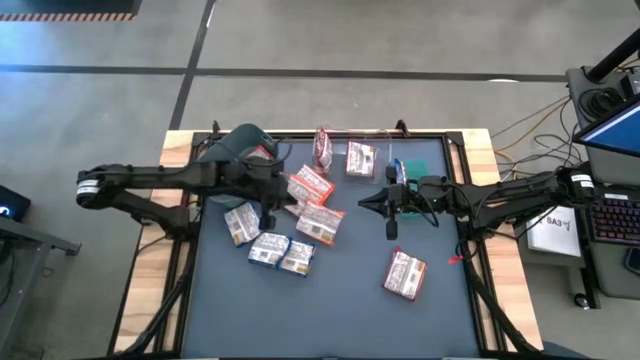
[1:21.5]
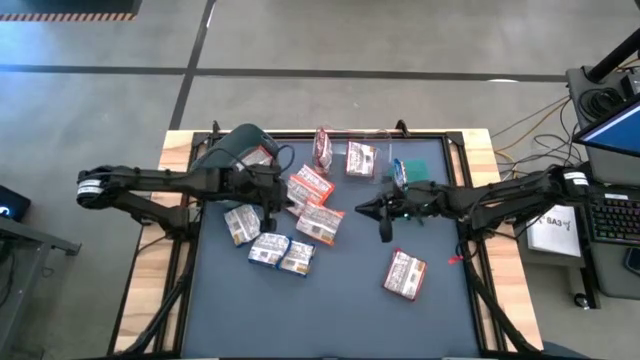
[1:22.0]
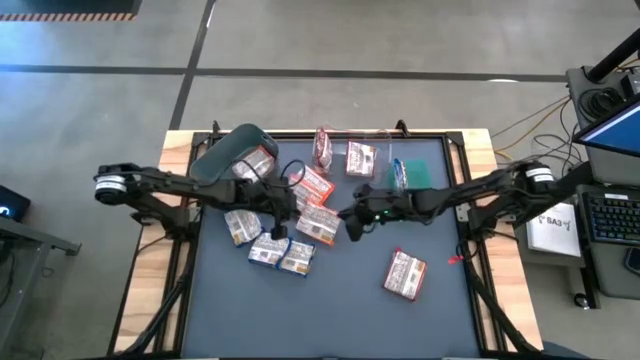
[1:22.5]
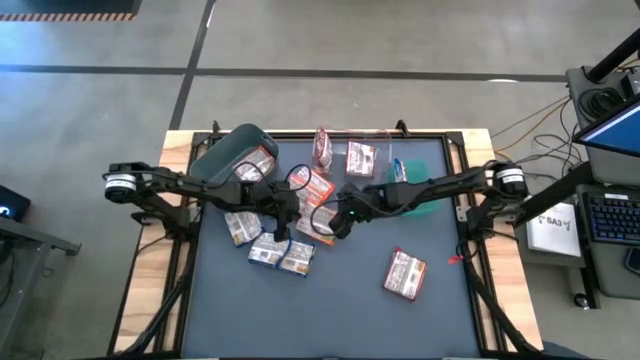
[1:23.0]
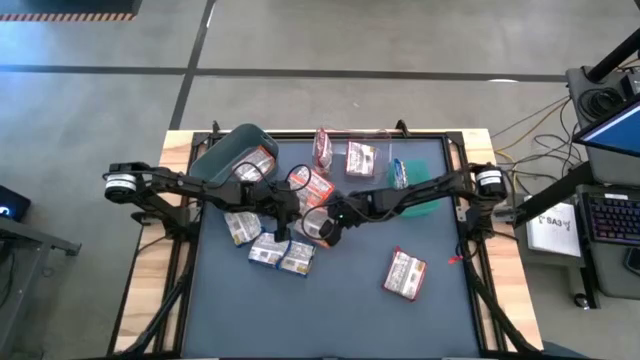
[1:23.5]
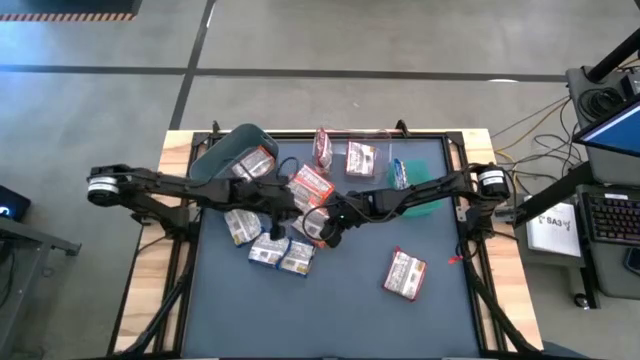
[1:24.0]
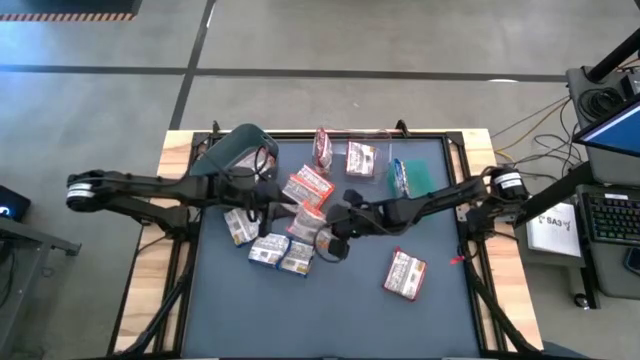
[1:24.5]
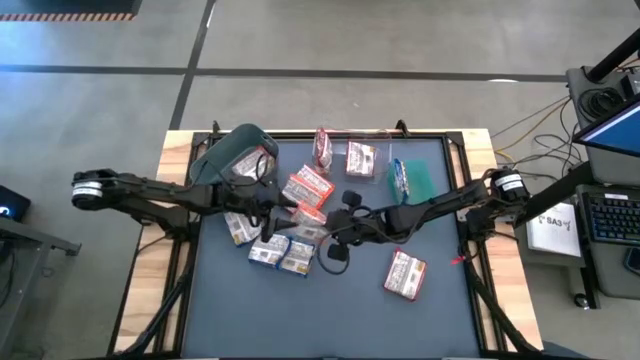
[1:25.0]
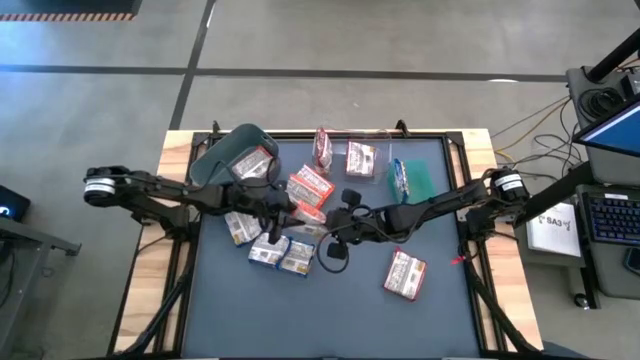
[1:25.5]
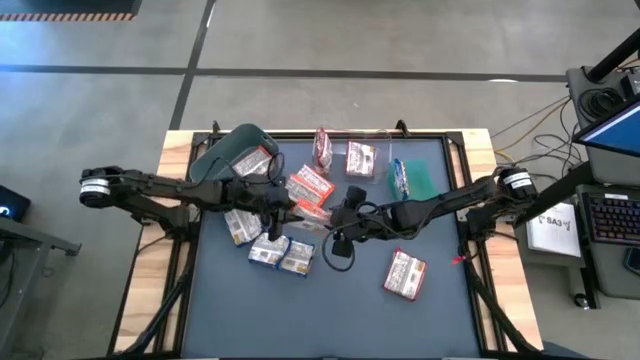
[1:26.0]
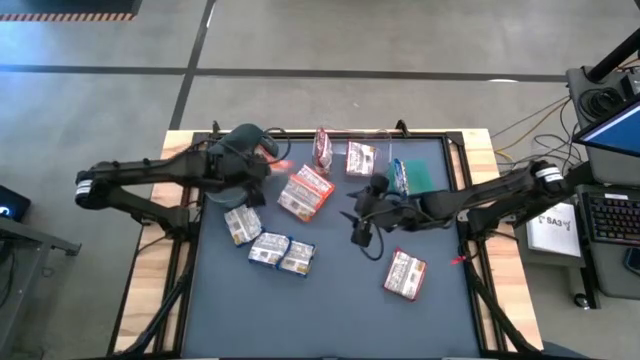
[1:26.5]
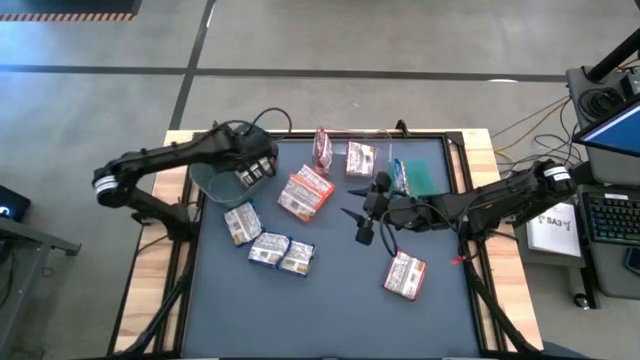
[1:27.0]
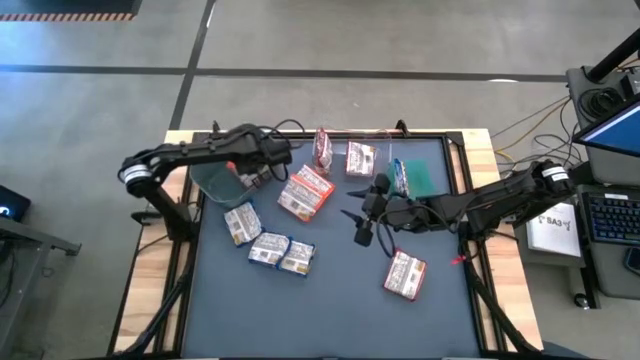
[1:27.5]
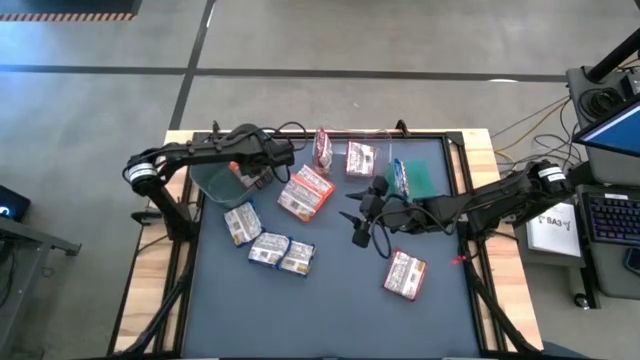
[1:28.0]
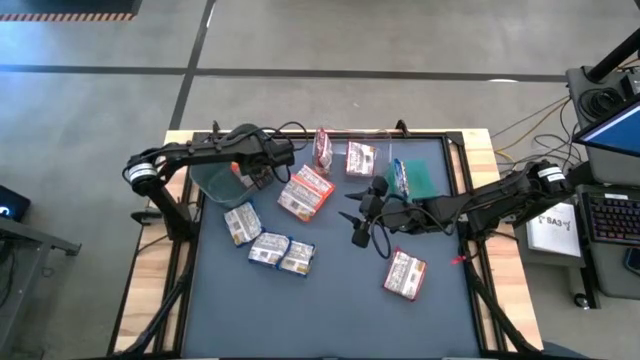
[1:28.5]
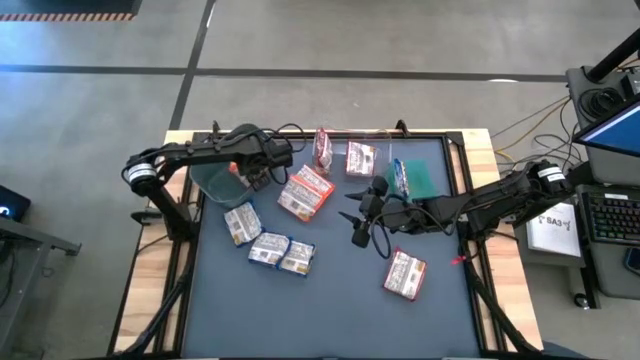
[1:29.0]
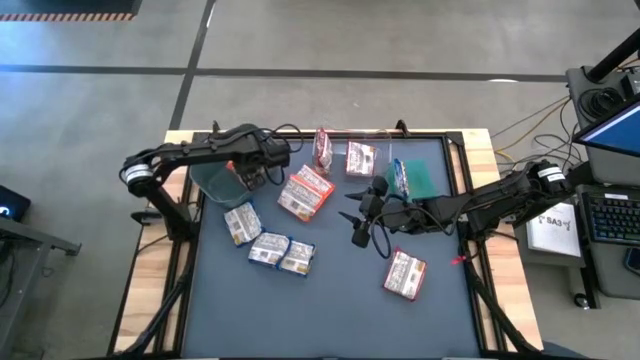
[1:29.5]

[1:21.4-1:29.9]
Task: Sort Maruchan noodles
Put the orange noodle pack into the gray bin

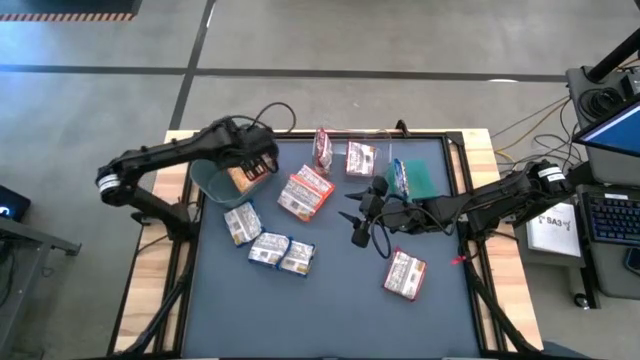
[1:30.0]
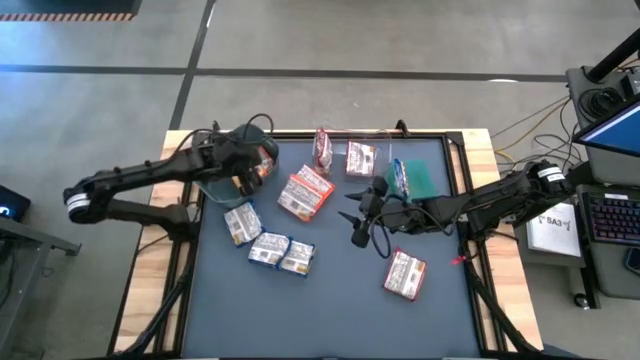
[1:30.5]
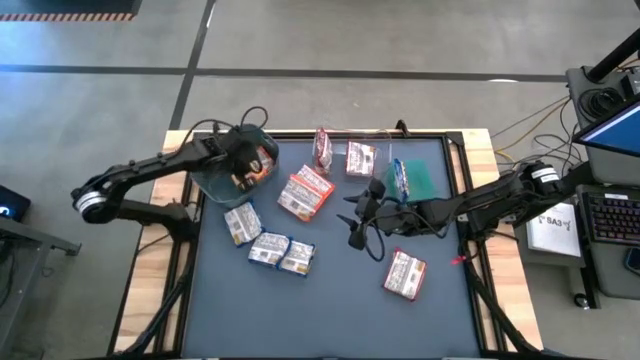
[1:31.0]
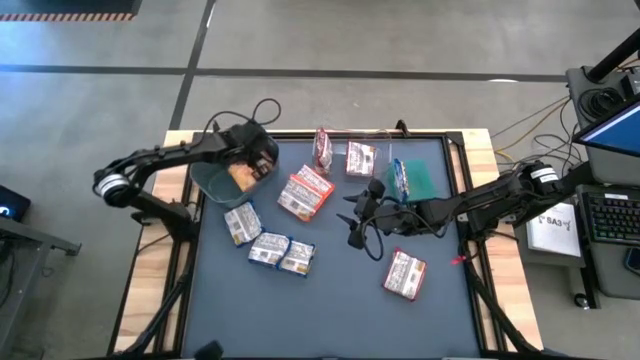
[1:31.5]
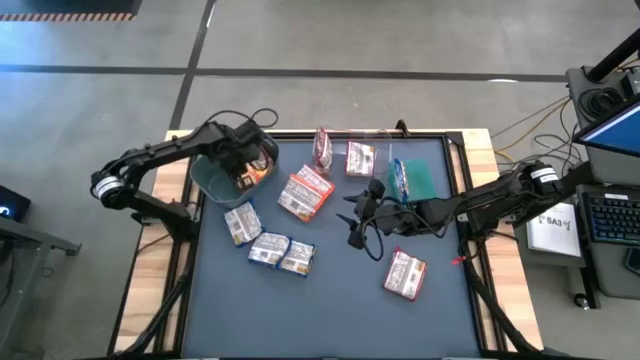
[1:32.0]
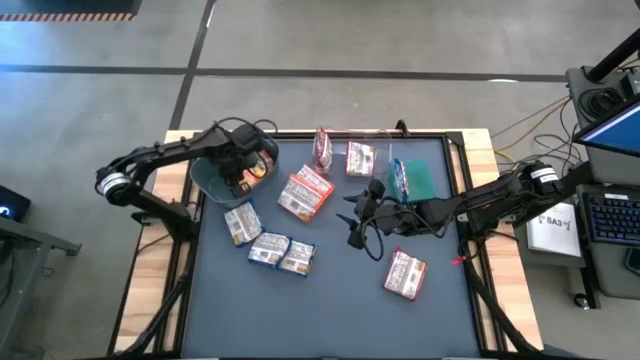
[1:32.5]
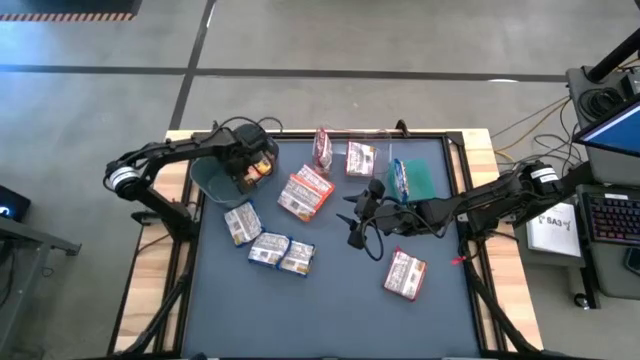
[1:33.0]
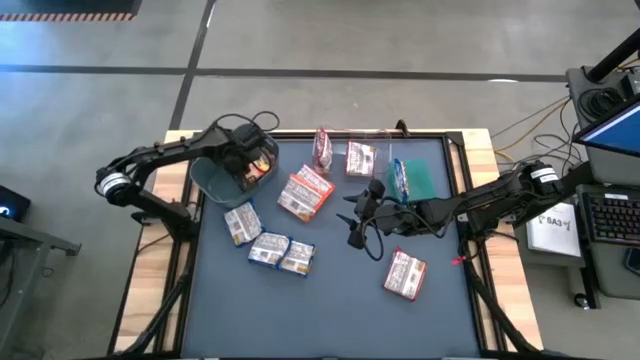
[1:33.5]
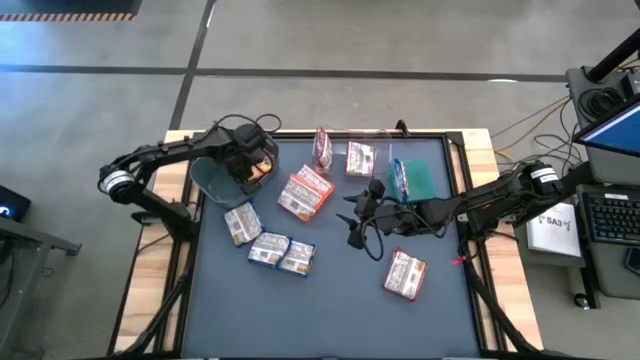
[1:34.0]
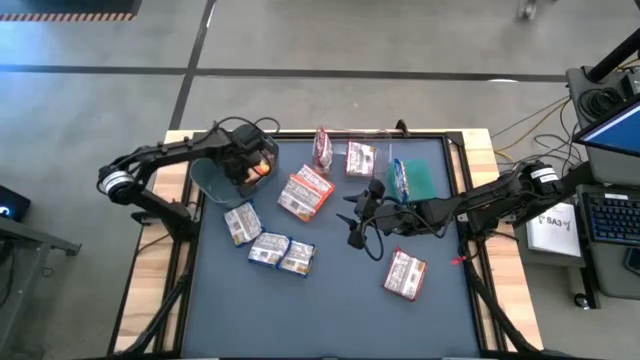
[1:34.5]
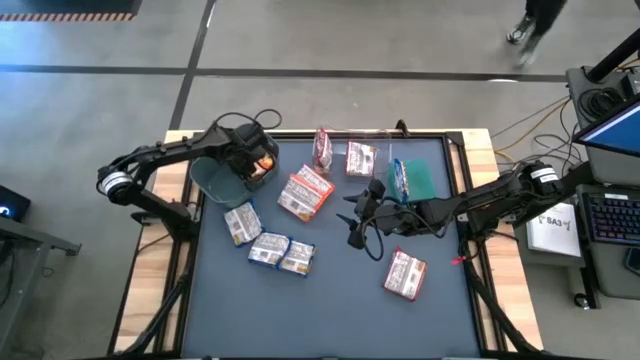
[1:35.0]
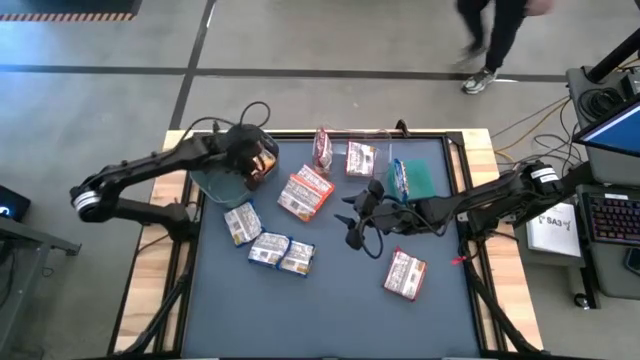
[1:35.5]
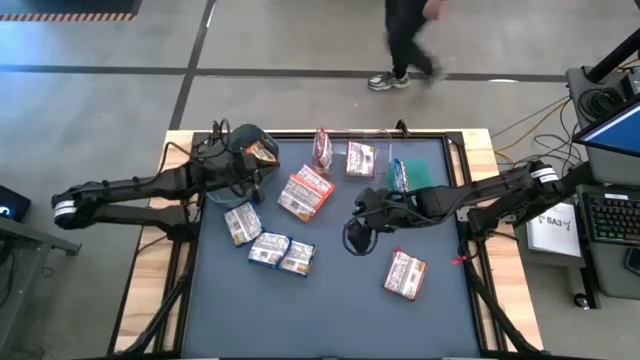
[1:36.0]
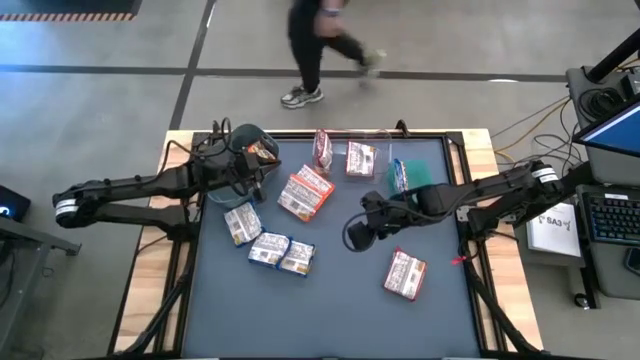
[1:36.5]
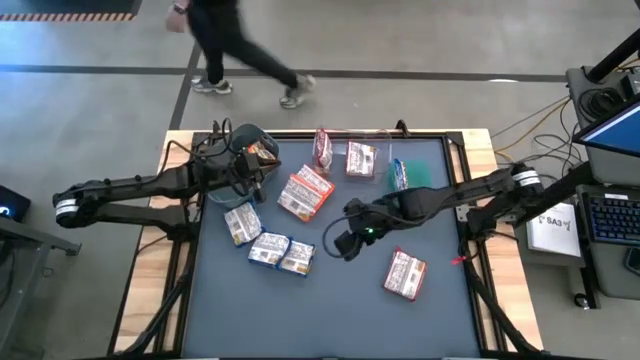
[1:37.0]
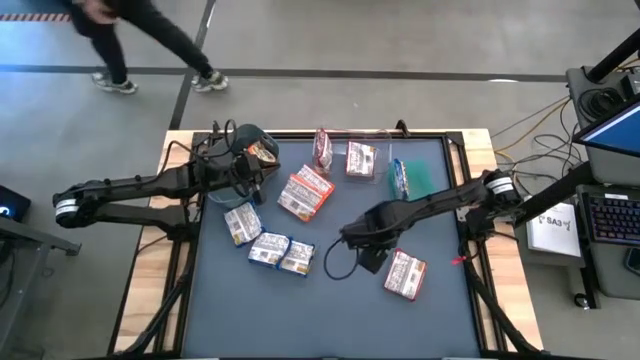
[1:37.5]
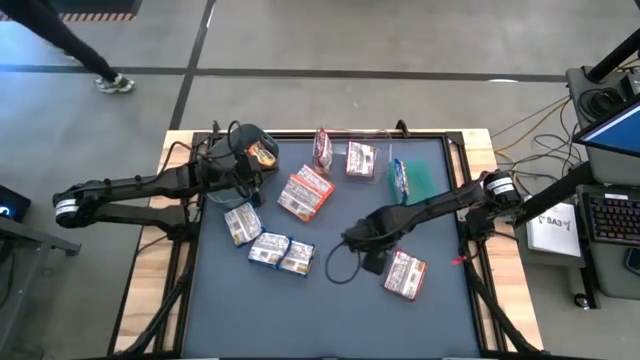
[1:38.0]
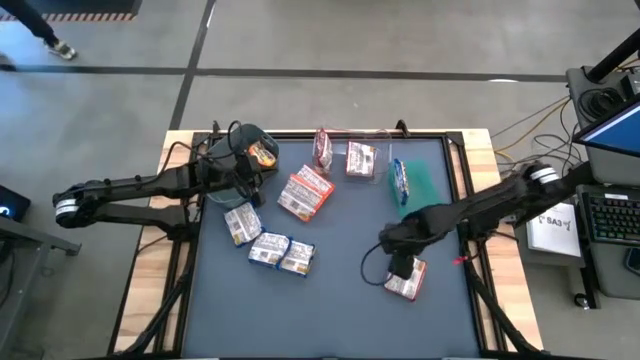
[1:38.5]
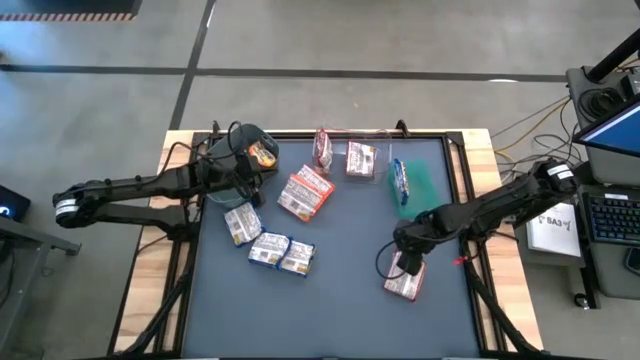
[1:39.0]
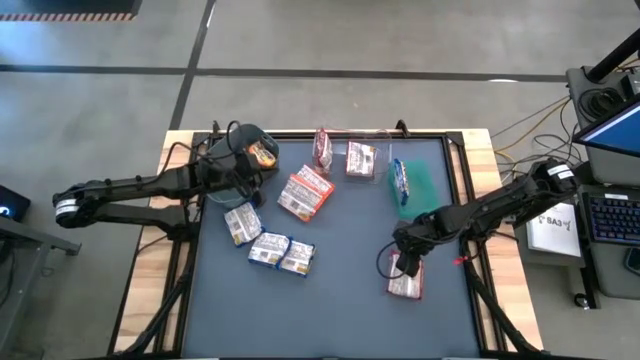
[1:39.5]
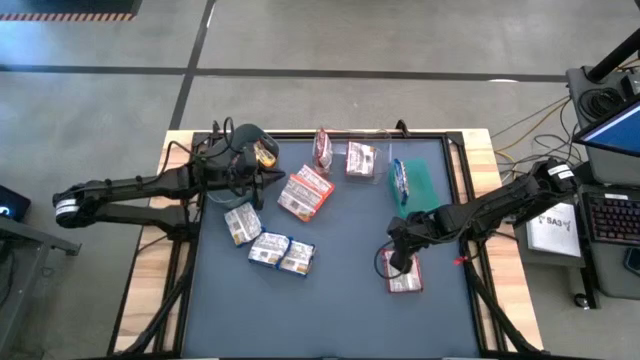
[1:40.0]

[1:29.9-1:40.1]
Put the red noodle pack into the transparent bin

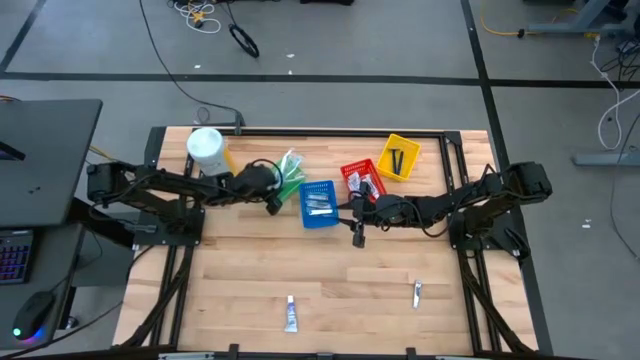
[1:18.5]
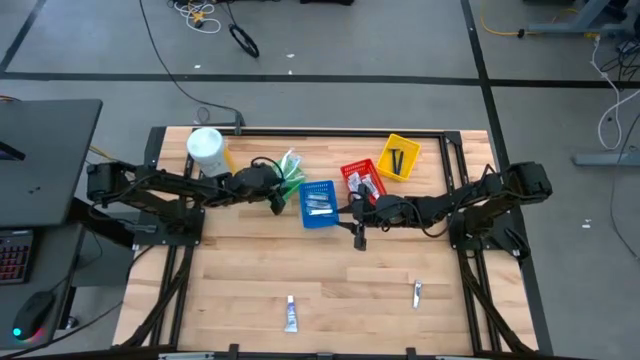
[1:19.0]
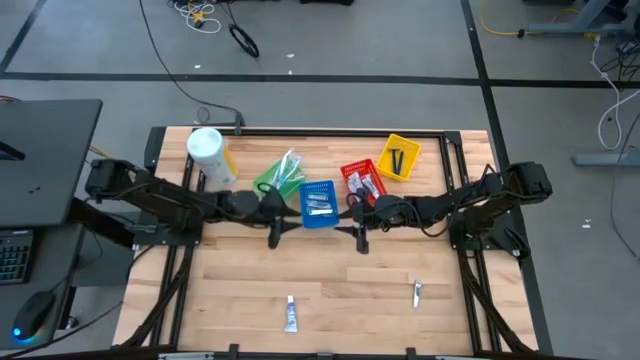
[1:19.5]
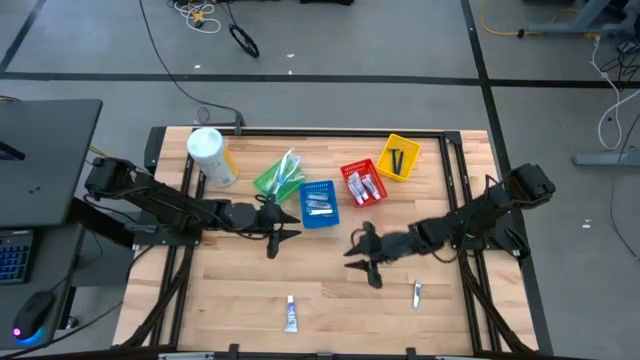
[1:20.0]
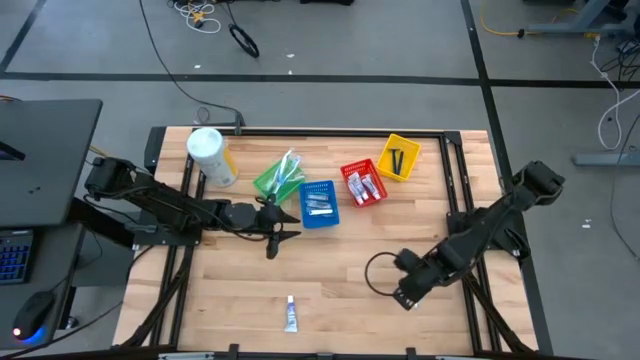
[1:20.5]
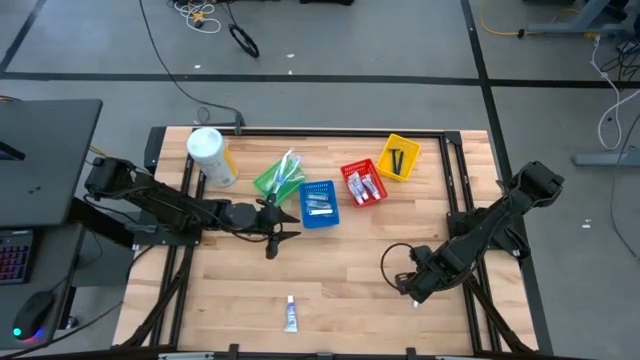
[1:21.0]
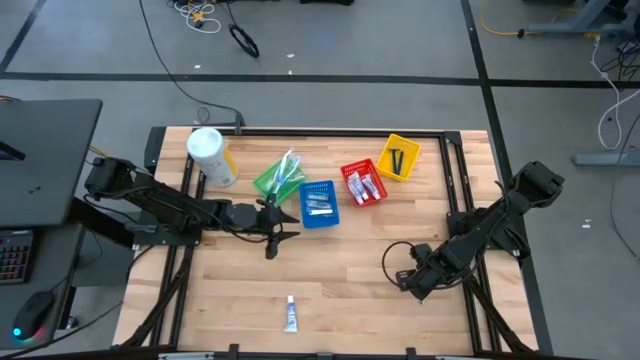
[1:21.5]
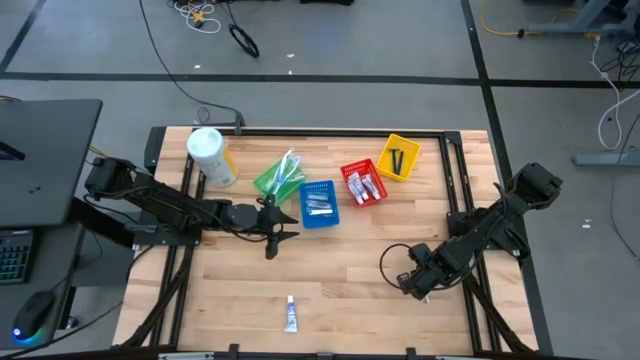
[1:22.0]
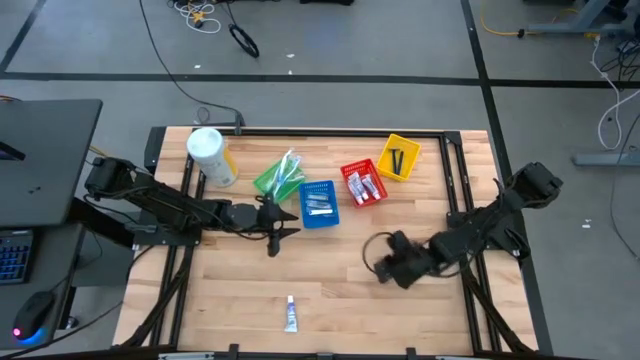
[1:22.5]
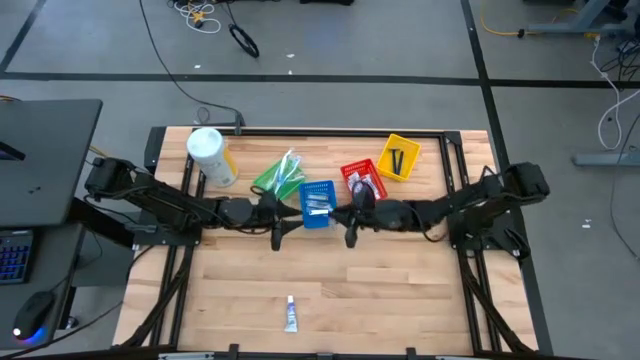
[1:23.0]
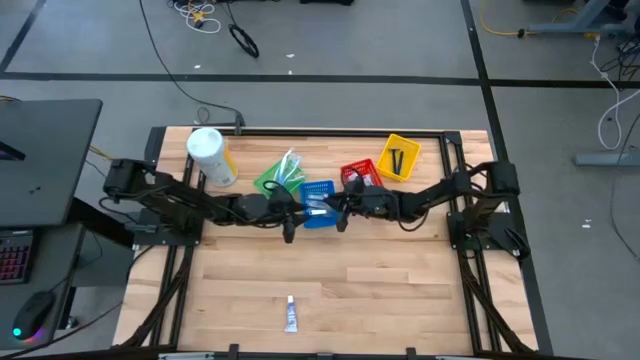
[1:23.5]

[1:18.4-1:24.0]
Task: Pick & Place Travel size toiletries
Put the nail clipper into the blue bin
